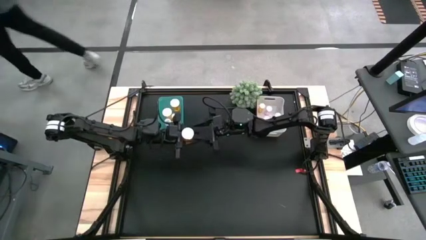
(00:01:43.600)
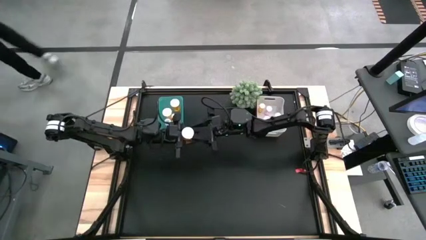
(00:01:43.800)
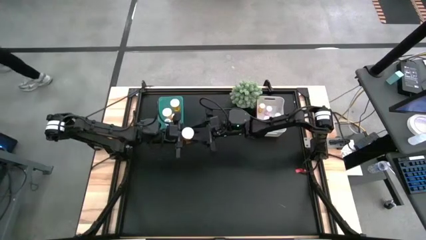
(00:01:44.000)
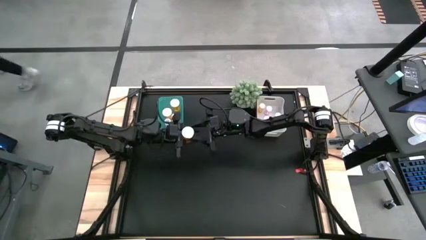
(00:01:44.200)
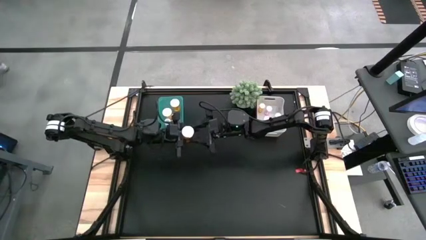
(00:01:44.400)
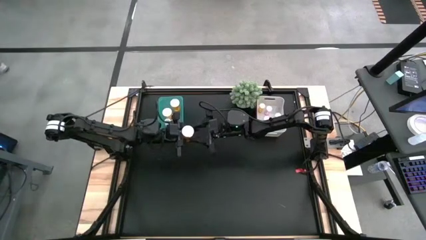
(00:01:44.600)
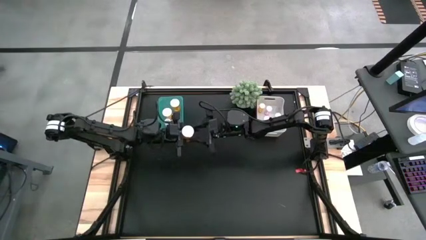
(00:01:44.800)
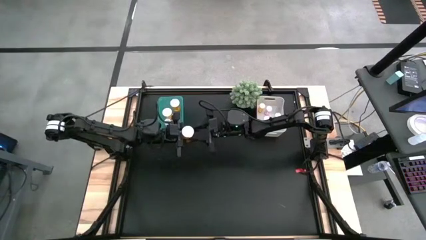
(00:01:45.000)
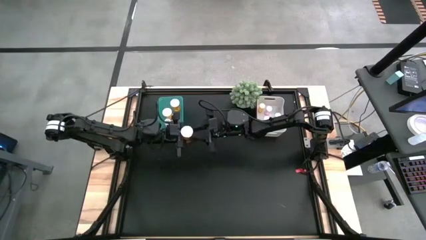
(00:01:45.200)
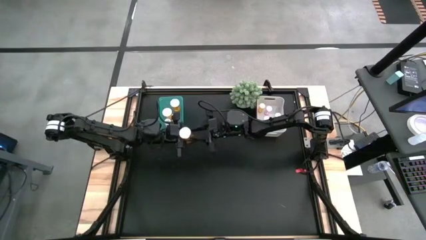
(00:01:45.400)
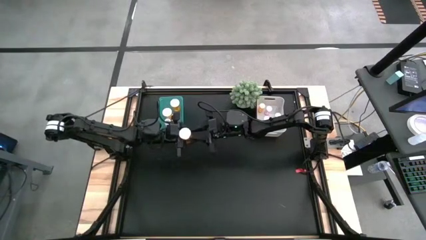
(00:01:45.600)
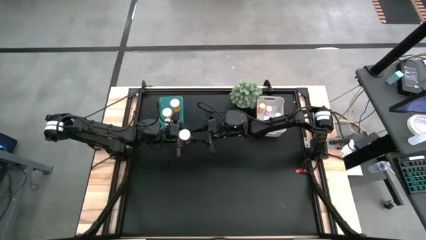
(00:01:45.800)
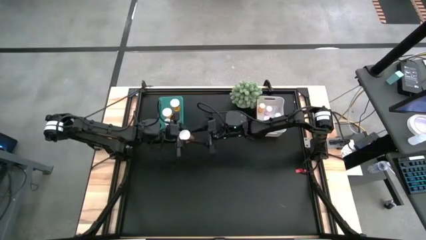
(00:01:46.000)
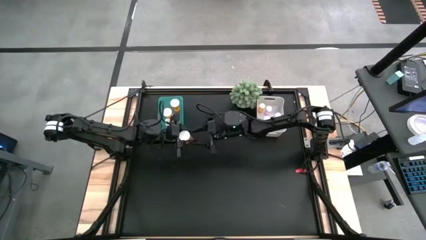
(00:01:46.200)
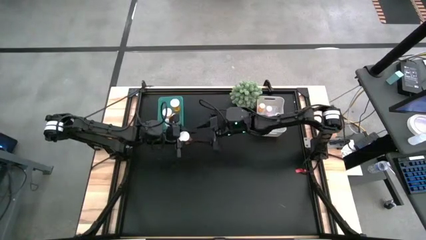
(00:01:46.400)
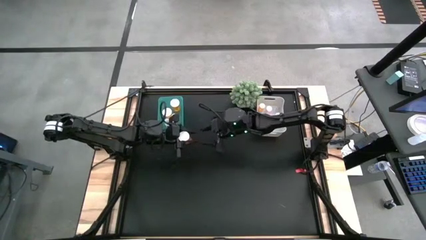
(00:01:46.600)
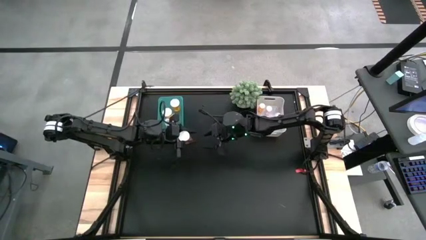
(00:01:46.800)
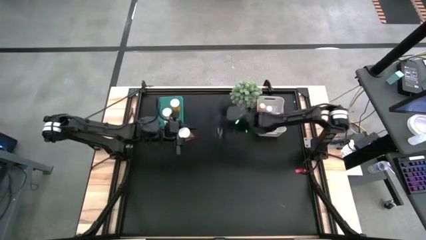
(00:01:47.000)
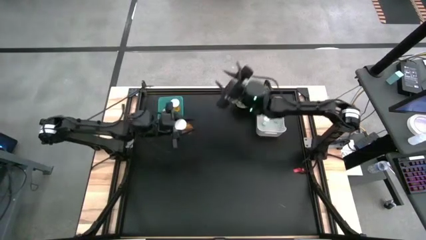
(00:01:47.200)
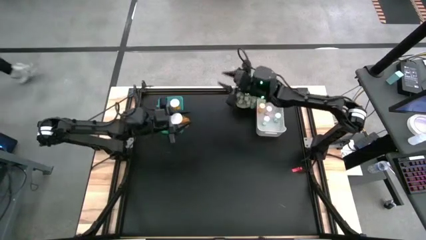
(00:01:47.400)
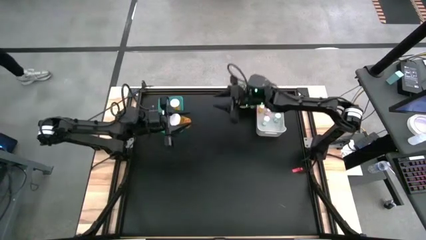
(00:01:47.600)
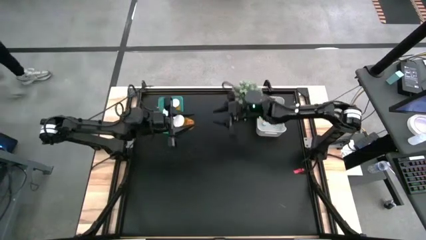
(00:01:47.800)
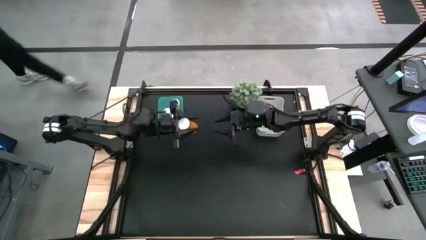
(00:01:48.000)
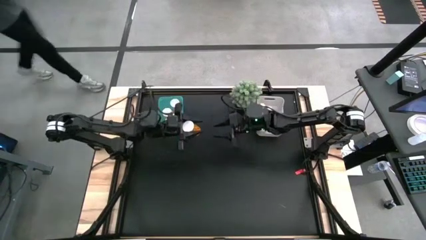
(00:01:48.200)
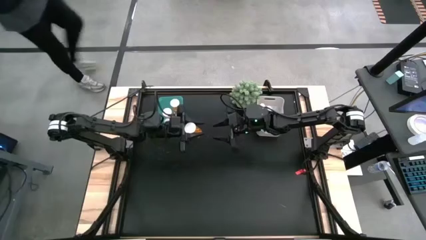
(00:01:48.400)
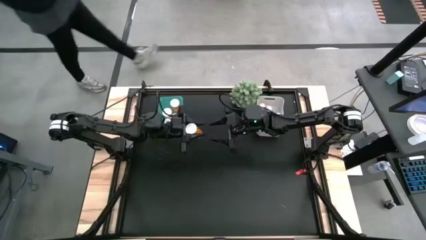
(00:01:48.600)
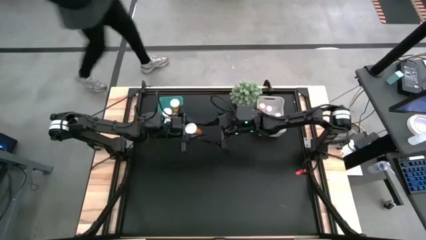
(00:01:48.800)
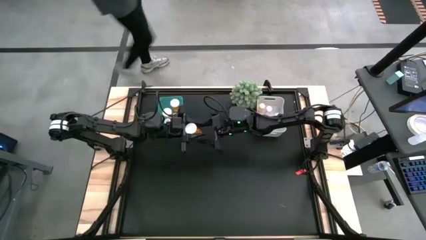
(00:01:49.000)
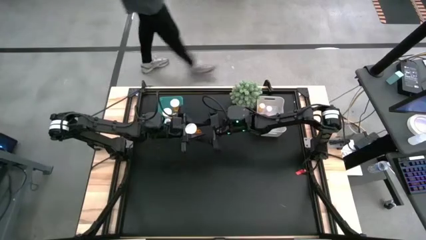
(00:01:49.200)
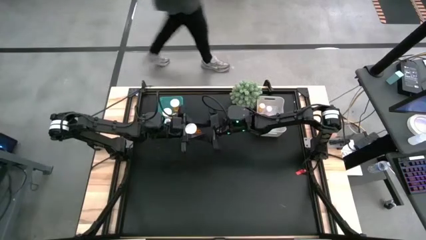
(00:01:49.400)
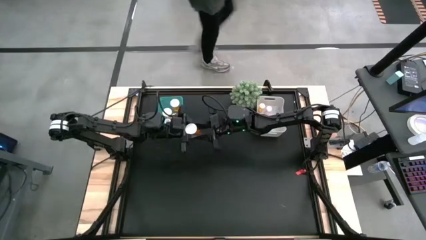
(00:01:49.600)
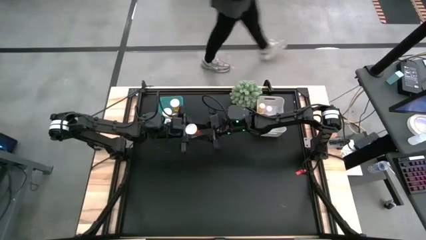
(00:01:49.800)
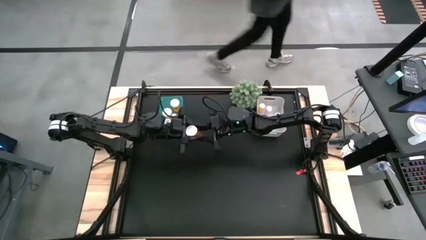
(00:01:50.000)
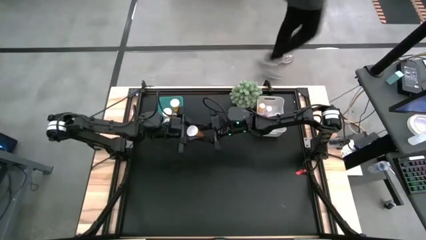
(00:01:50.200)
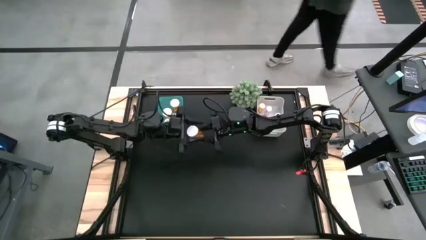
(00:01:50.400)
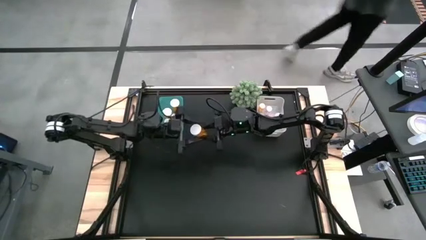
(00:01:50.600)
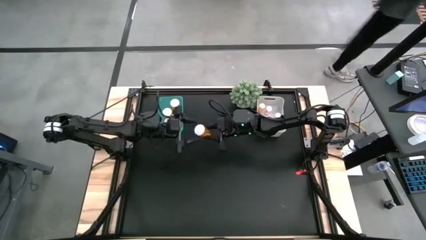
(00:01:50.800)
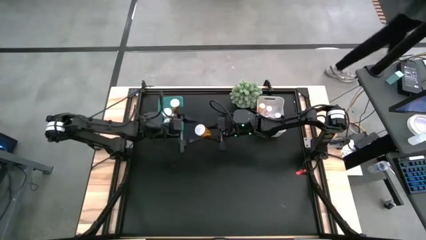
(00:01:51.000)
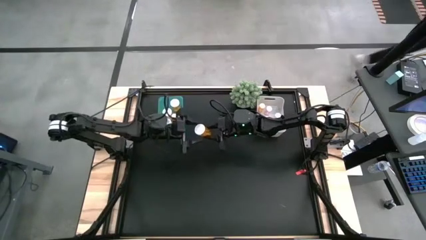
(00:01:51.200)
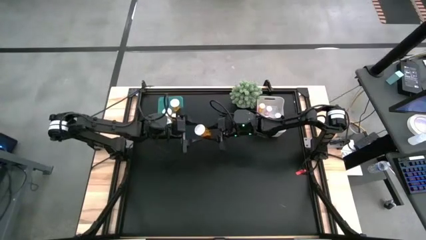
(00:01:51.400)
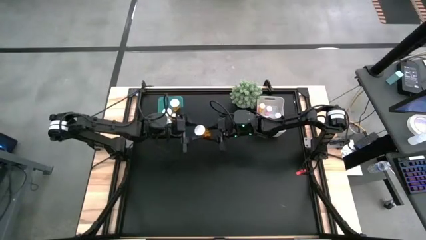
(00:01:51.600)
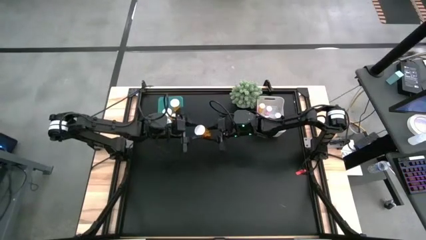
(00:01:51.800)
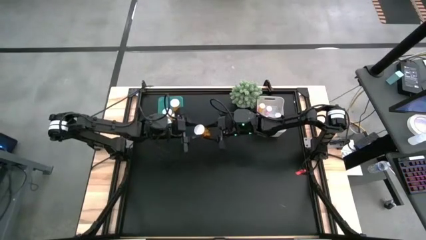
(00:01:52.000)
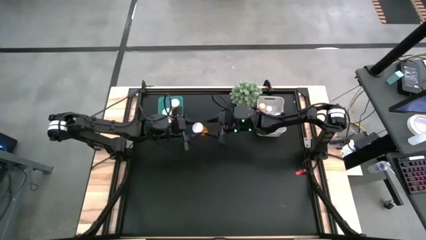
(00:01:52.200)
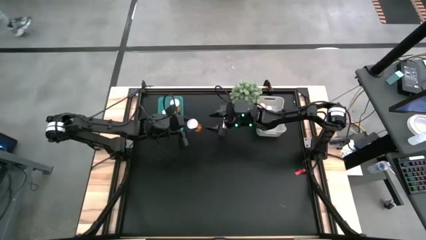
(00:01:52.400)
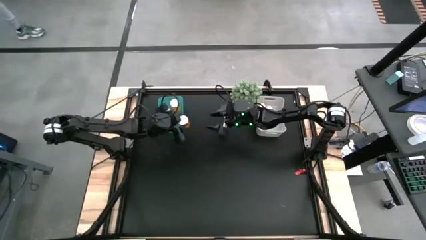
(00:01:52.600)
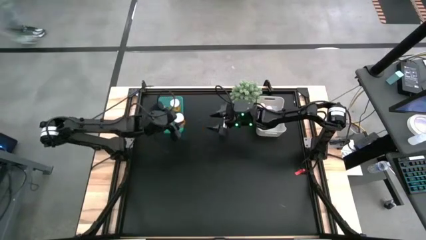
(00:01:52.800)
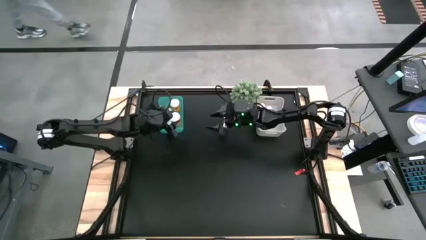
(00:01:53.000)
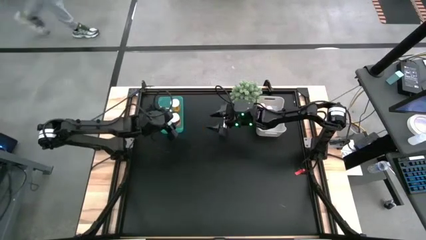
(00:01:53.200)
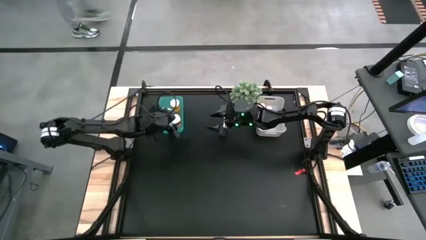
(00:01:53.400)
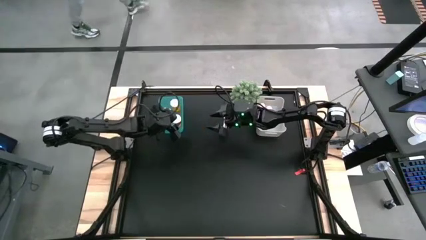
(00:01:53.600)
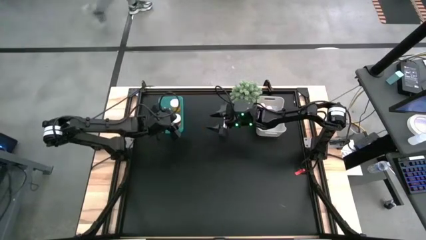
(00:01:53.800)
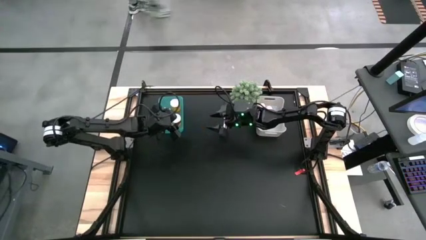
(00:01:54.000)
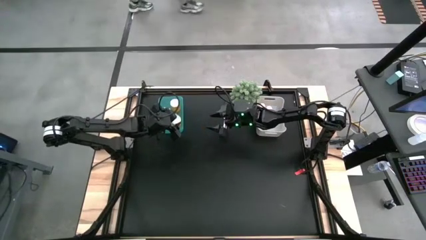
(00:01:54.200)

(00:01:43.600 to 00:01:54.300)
Task: Pick and place medicine bottles into bin by pill shape (circle, oval)
Put the orange capsule bottle into the green bin

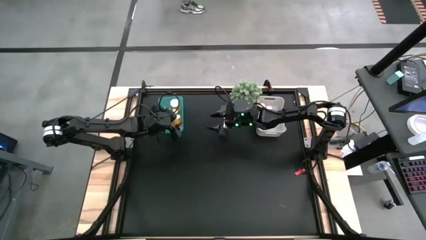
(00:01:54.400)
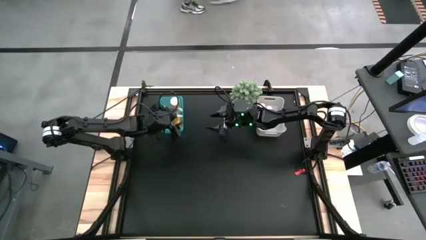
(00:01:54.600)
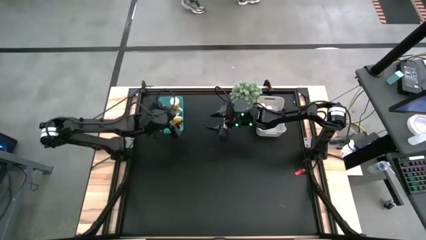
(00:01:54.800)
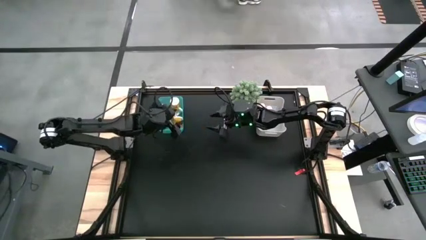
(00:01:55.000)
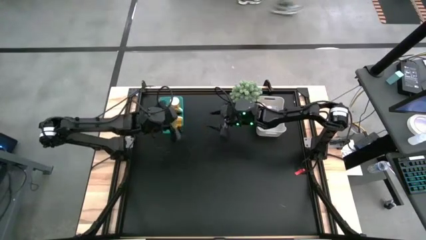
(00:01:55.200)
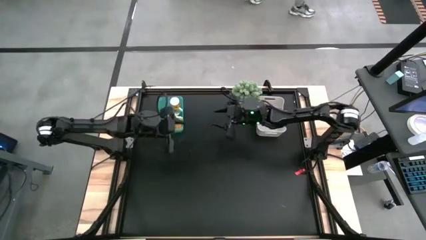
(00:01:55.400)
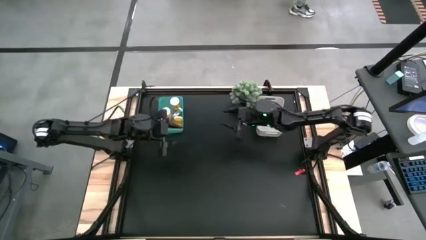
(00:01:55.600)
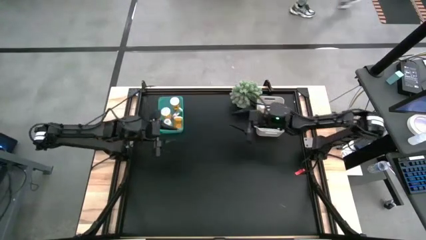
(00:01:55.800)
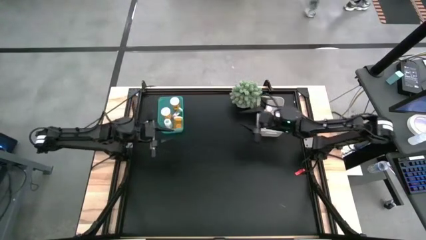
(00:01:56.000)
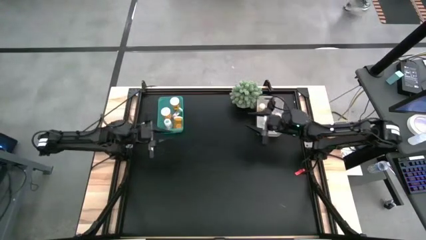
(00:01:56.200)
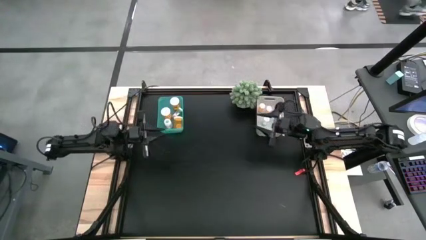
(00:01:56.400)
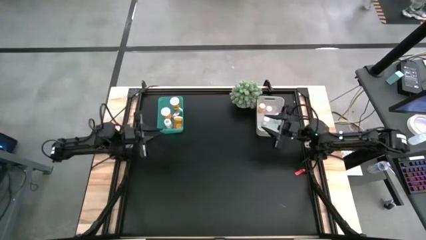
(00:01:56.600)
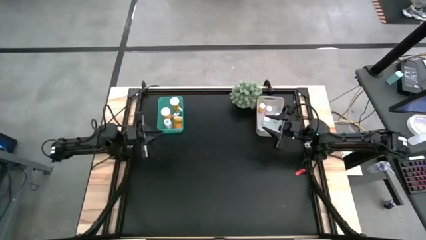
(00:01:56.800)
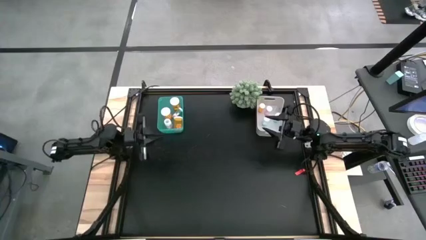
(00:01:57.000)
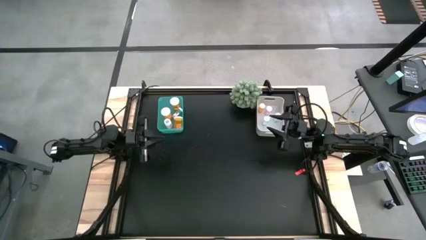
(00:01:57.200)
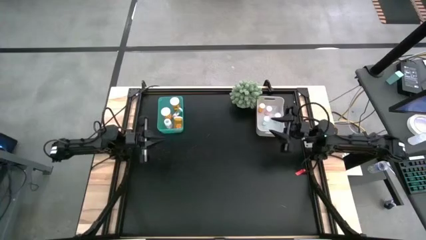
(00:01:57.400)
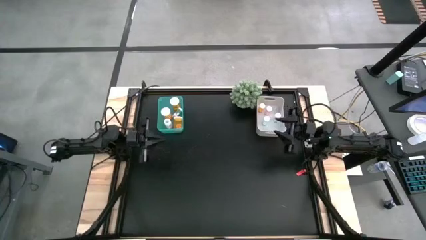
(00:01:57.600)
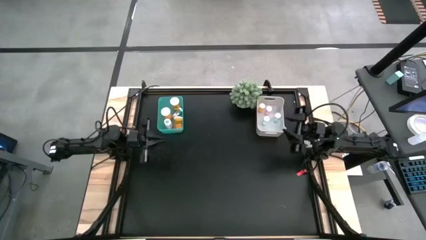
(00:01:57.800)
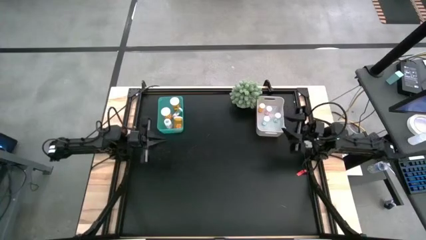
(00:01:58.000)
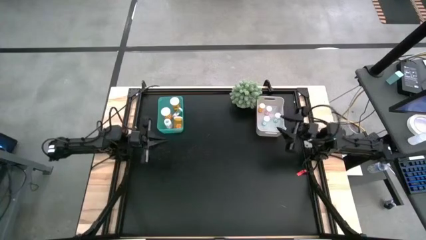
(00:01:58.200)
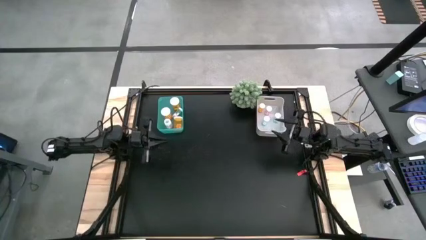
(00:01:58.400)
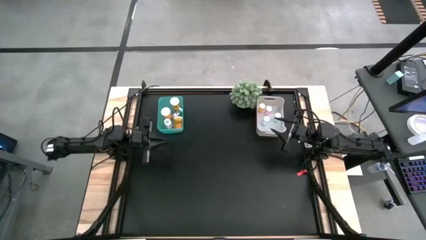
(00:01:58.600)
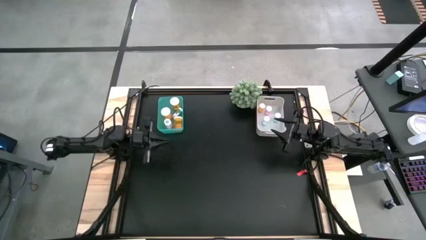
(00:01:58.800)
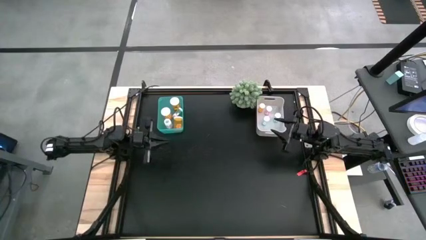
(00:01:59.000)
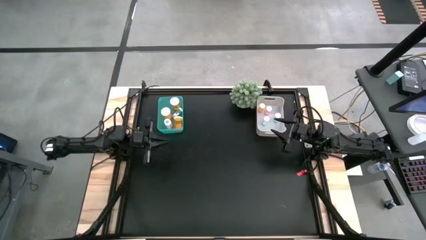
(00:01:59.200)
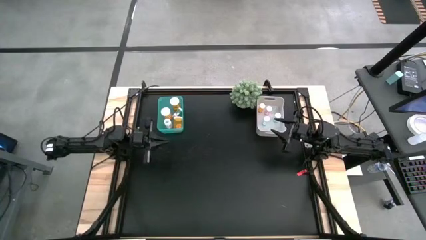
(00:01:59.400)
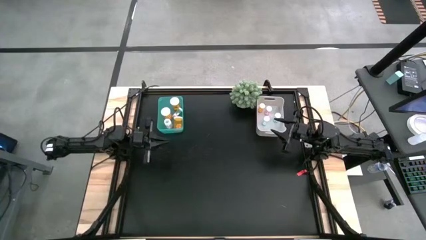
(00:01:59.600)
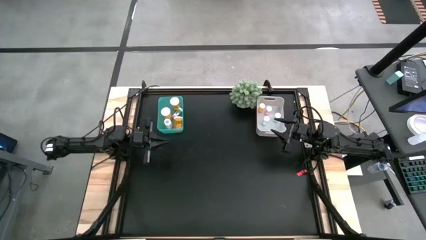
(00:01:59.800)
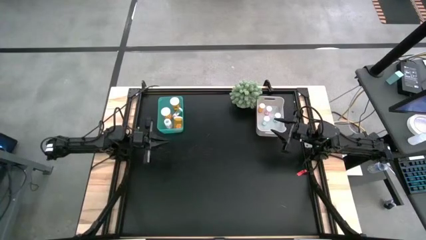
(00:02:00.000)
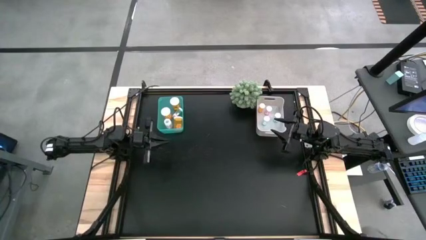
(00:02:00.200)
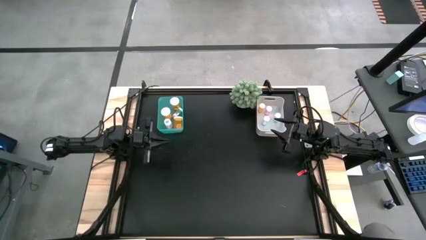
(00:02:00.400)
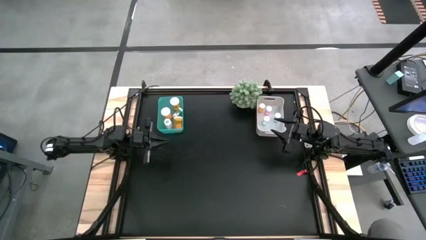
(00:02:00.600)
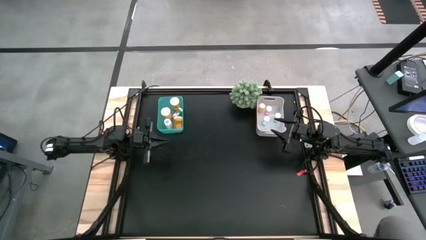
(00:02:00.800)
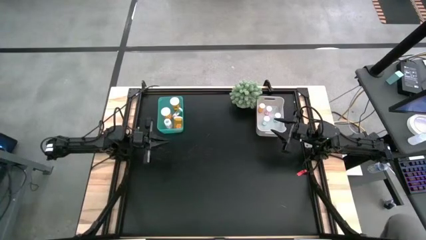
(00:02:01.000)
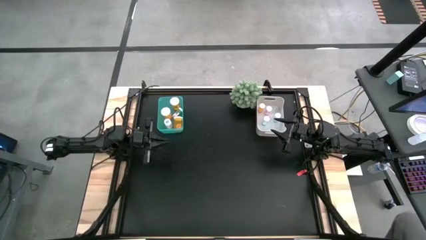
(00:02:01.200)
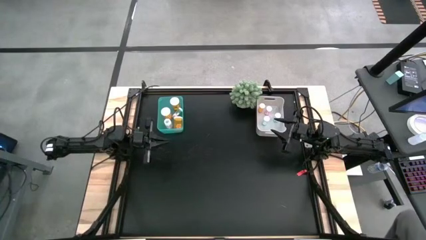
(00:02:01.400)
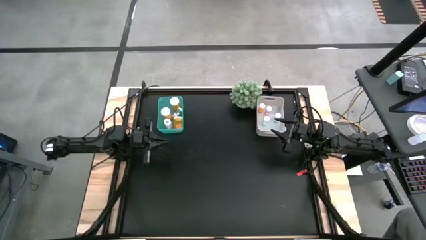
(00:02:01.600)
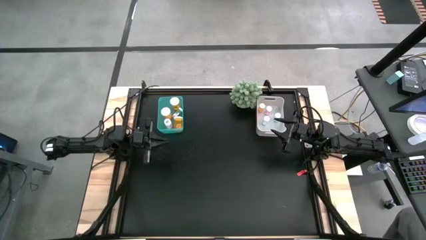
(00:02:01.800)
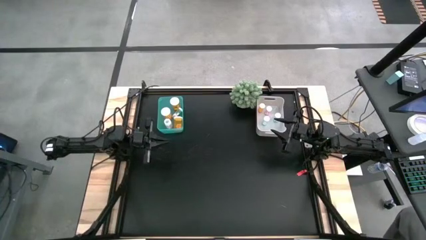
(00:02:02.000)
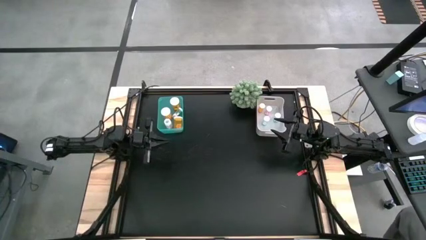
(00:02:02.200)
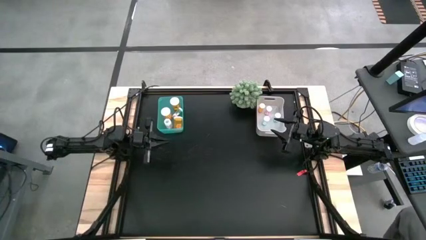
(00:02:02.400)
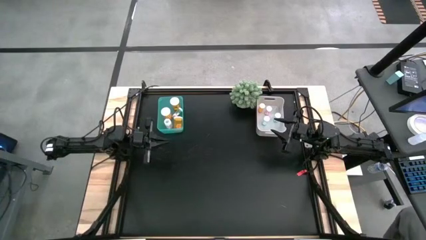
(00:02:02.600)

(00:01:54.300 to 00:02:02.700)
Return to Home Position
